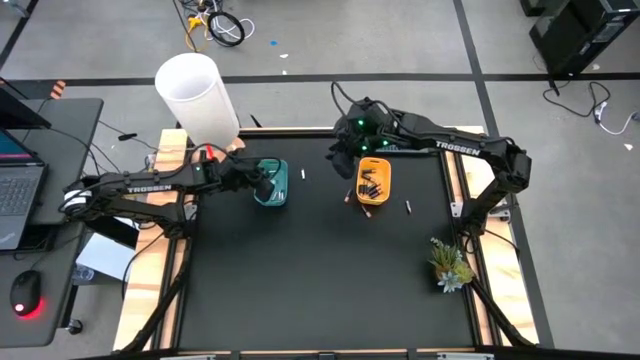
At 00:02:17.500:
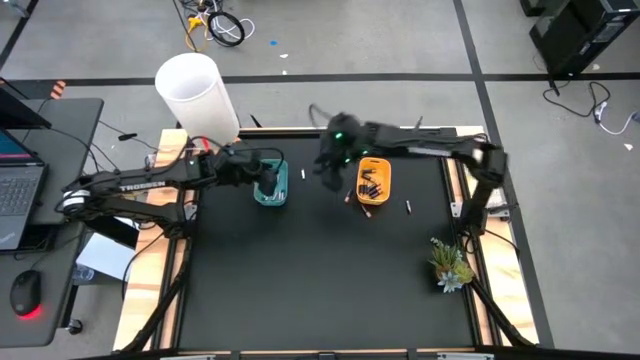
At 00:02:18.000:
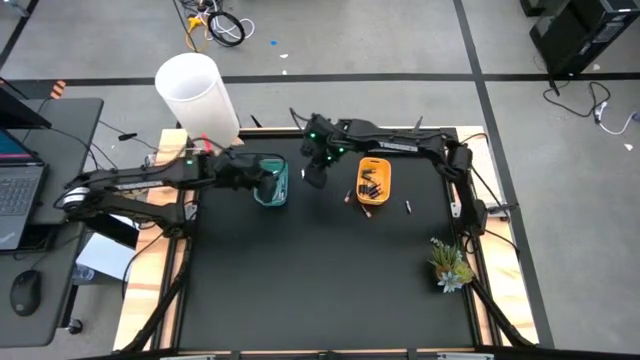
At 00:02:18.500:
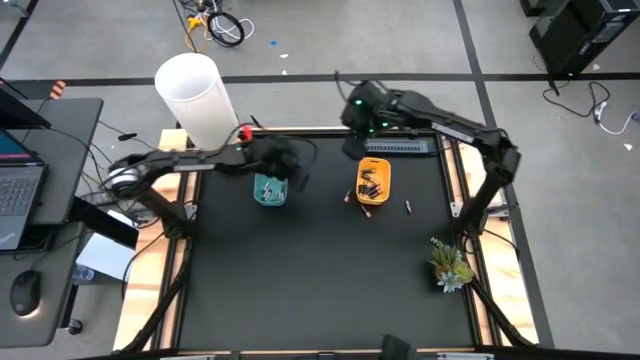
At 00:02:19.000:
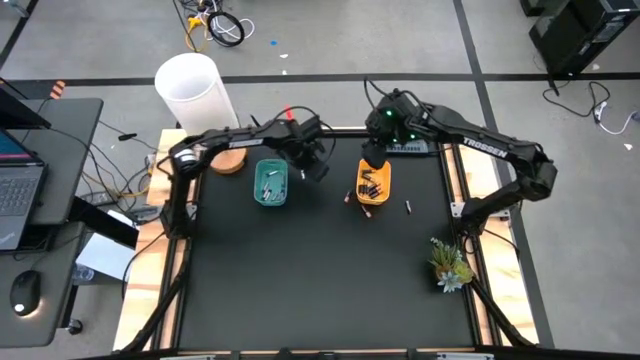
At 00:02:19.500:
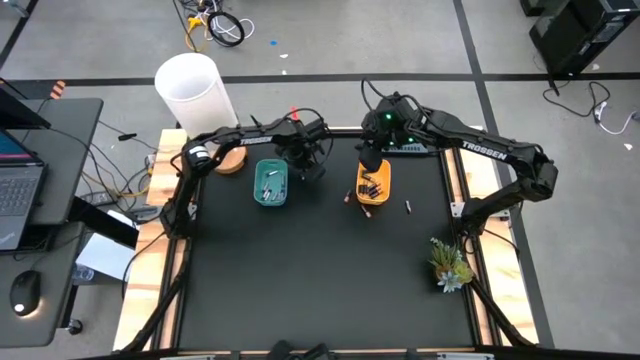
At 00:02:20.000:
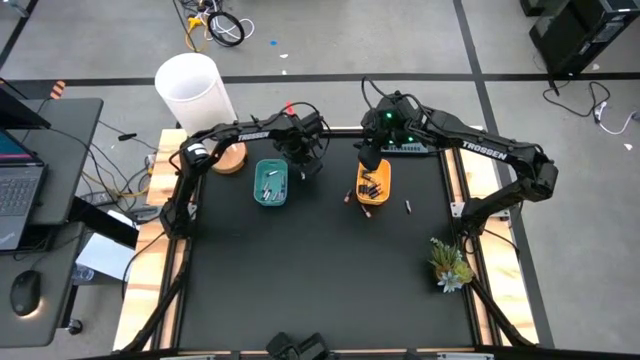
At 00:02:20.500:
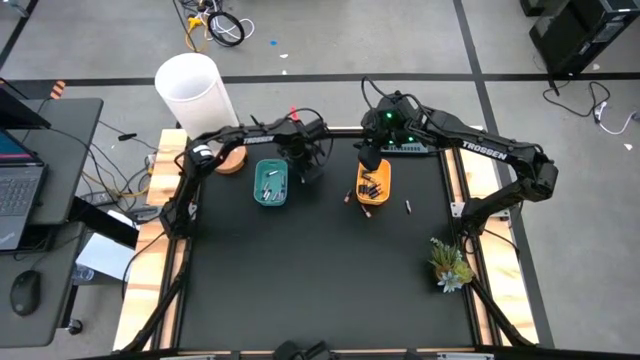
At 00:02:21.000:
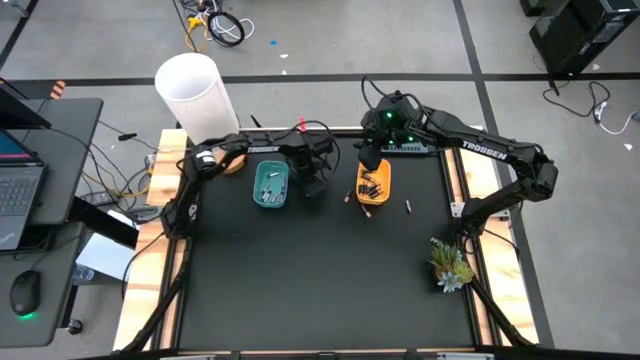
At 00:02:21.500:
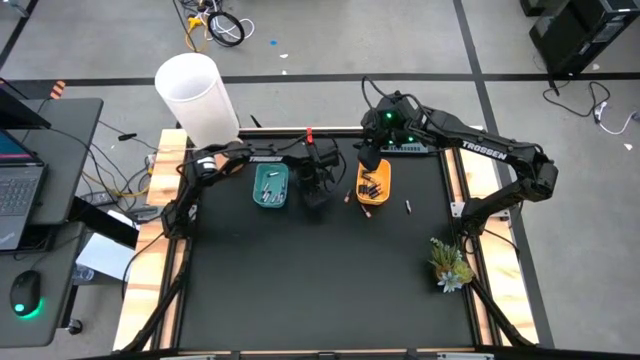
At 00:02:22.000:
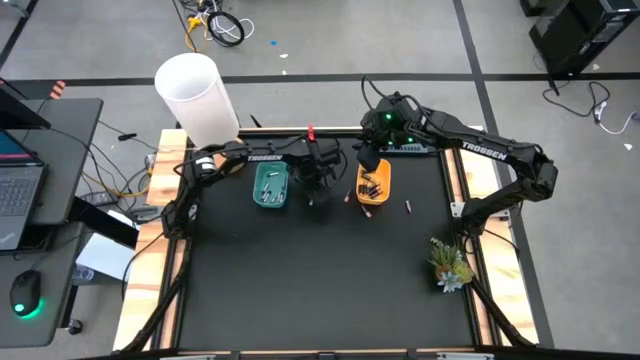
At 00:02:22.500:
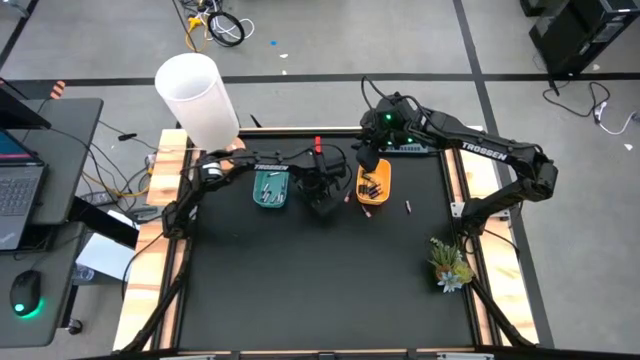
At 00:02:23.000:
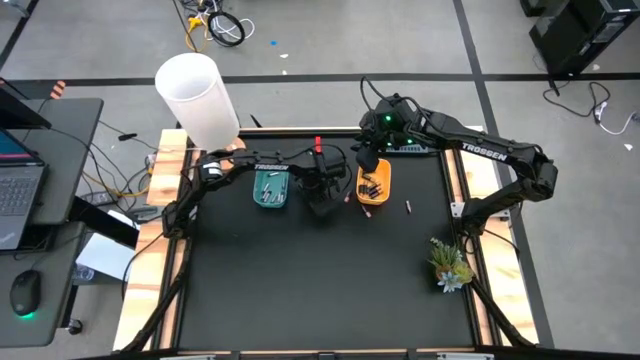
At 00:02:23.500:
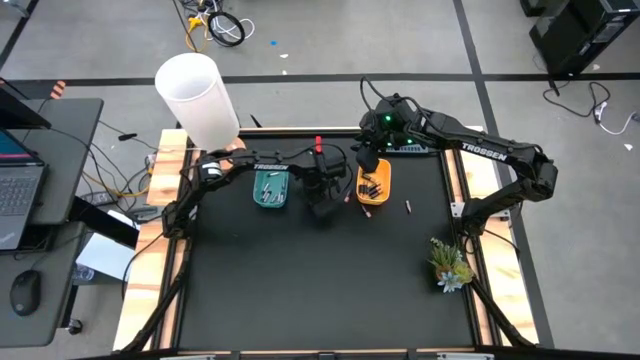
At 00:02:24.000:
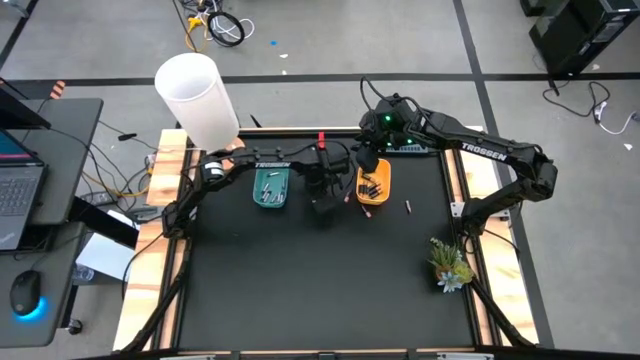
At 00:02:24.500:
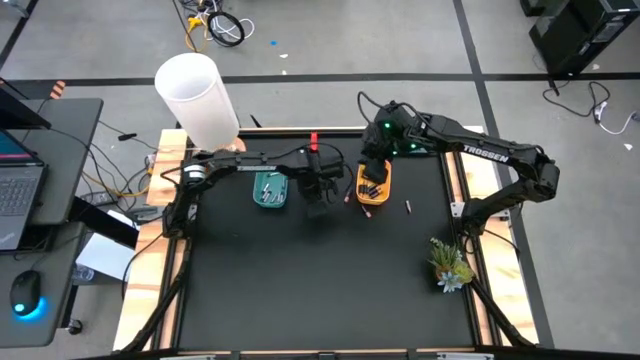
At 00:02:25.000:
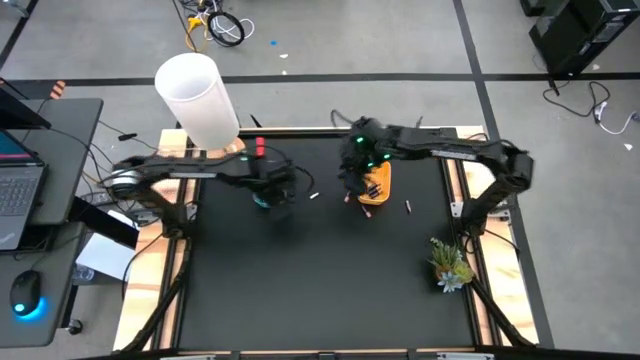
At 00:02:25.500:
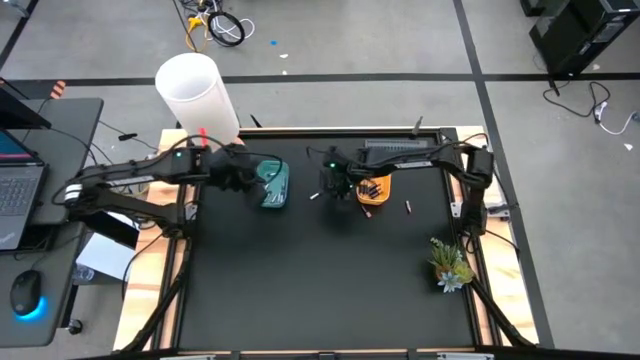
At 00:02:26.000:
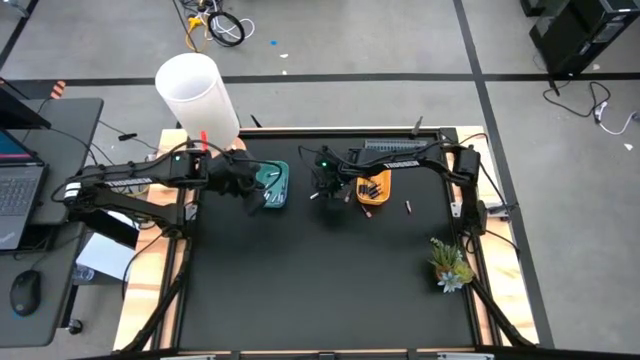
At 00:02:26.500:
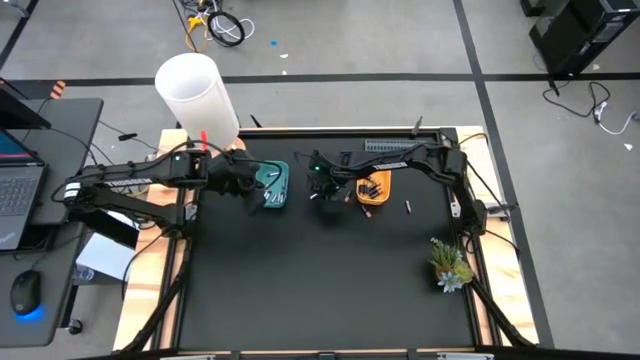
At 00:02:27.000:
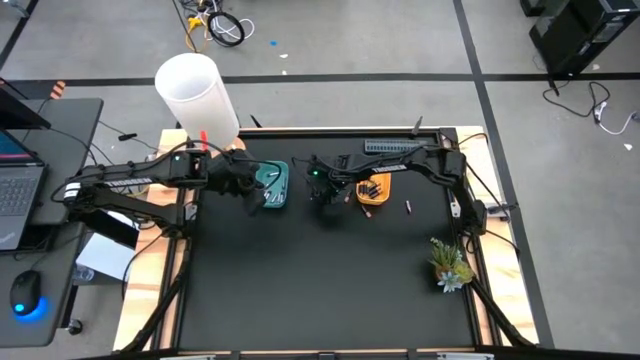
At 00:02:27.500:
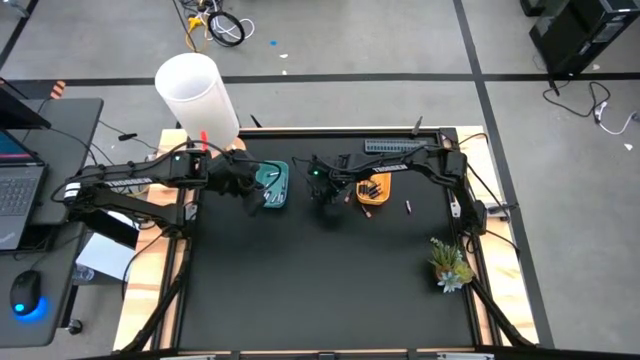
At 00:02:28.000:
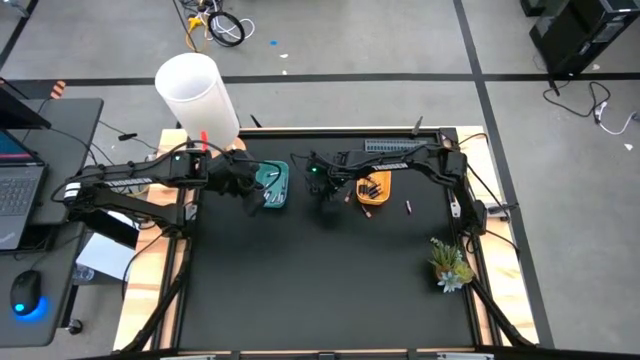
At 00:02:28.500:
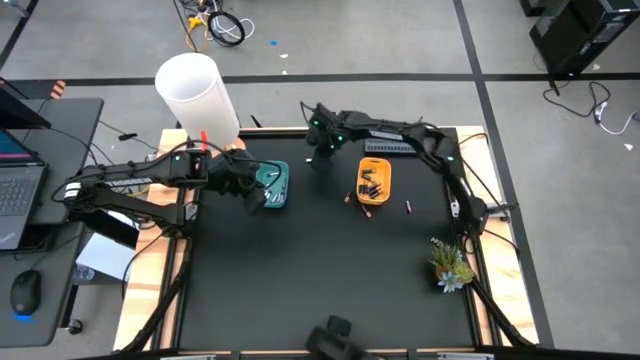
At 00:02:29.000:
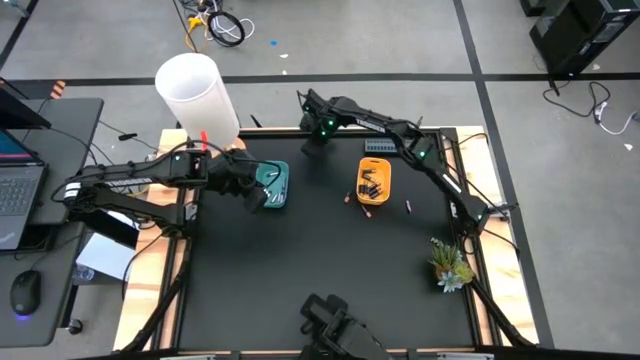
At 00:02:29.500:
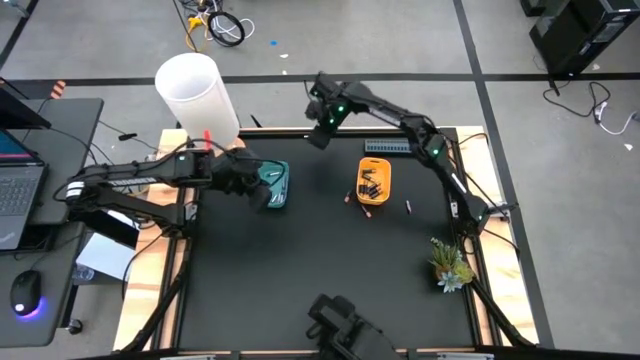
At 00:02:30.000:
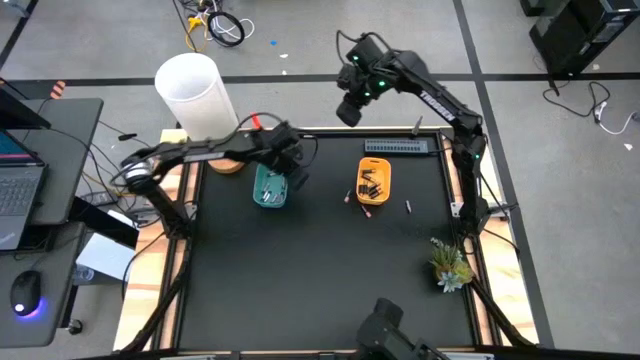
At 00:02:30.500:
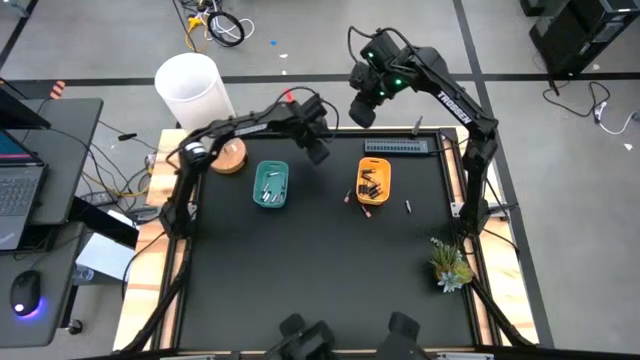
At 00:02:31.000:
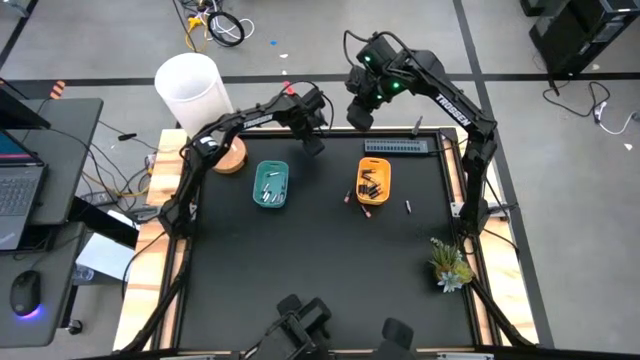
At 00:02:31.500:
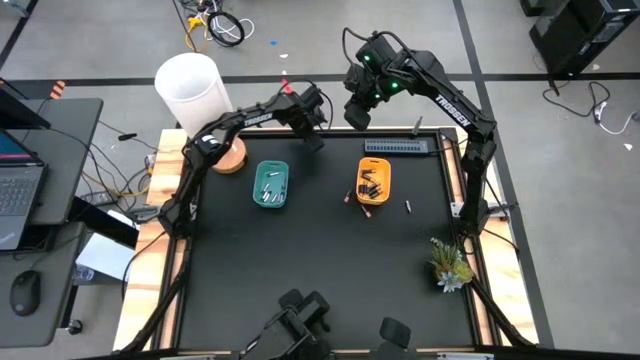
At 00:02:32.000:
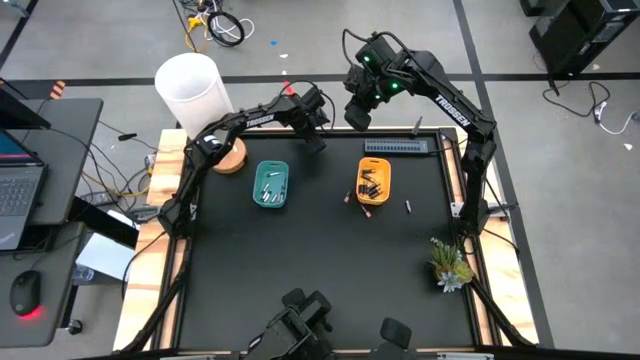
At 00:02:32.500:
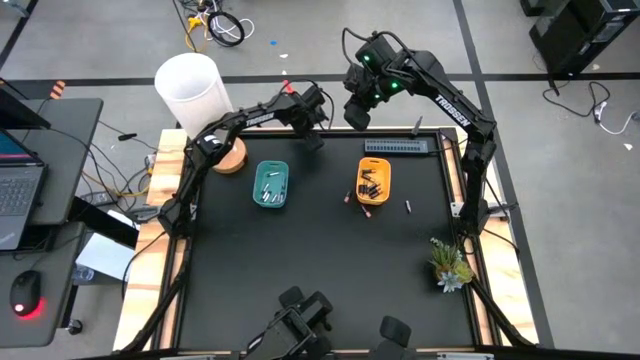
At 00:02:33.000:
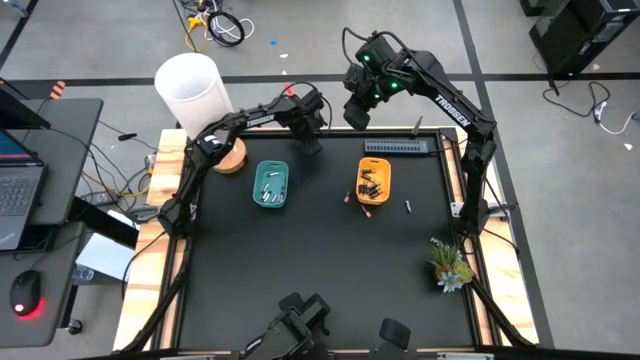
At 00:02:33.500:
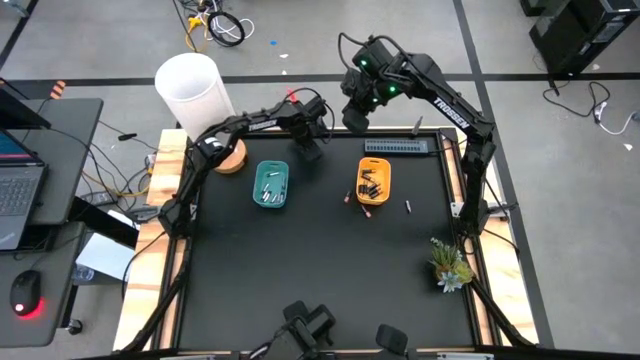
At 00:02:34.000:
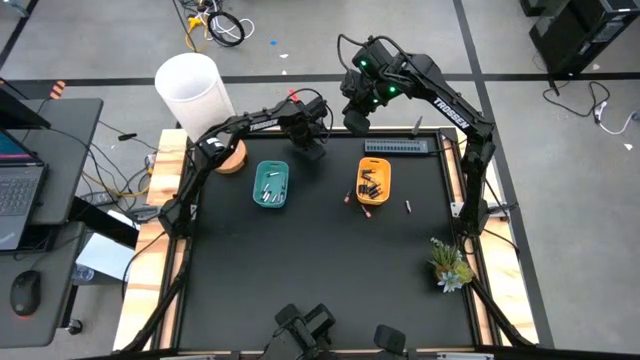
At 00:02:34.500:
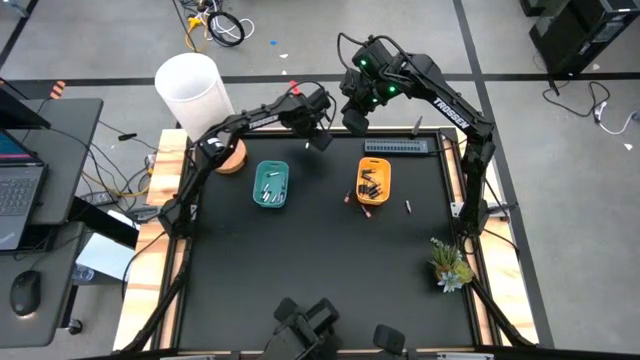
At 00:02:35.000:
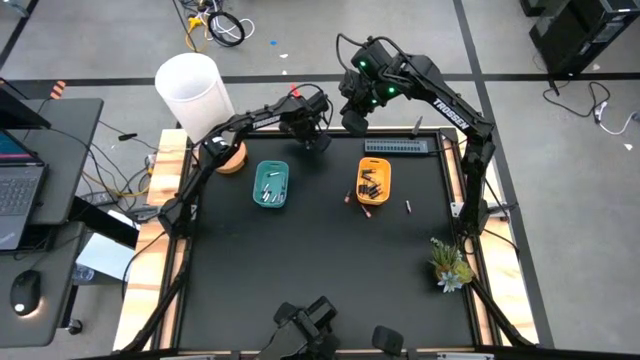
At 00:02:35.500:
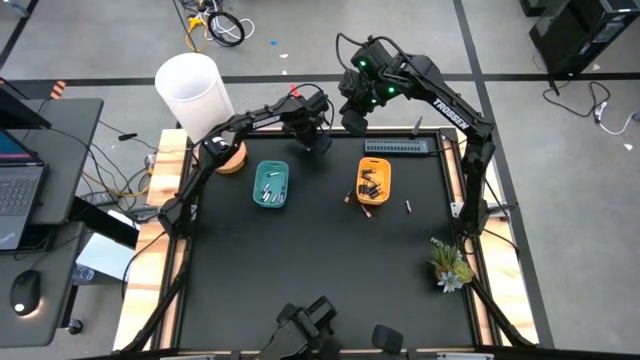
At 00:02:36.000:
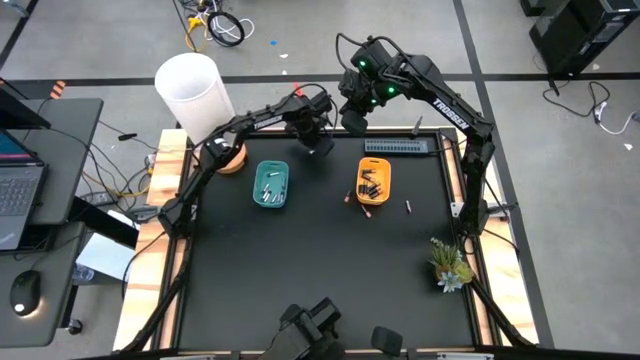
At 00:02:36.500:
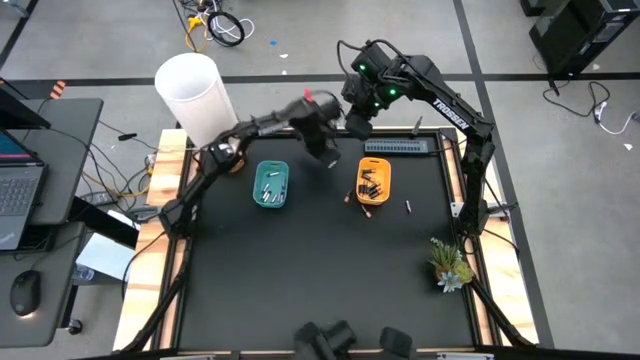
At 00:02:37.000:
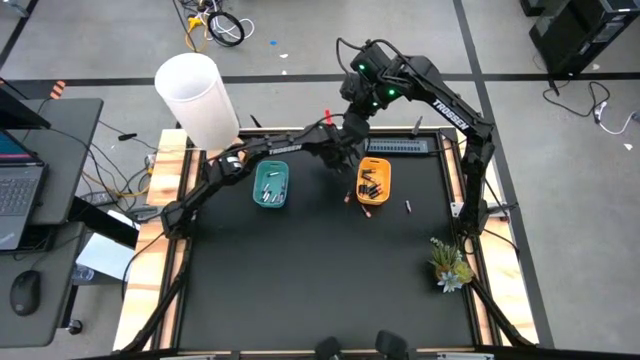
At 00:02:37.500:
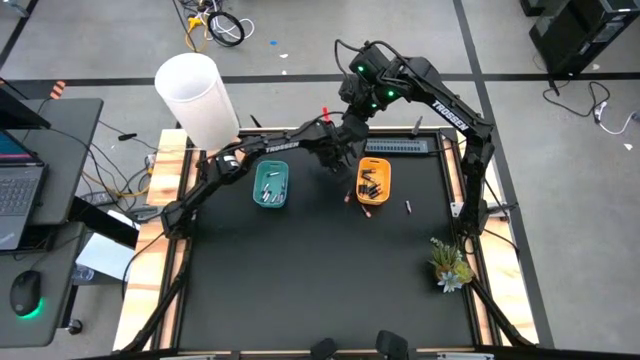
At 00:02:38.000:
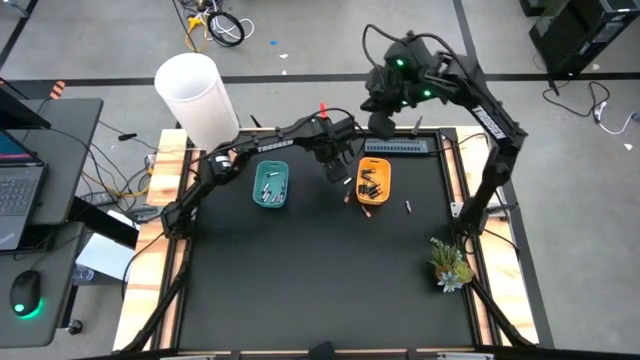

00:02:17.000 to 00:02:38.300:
Task: Sort batteries
Put the silver battery into the blue bin
